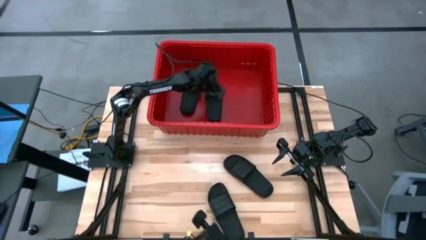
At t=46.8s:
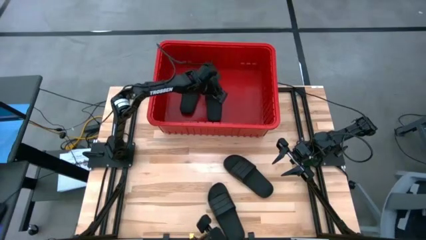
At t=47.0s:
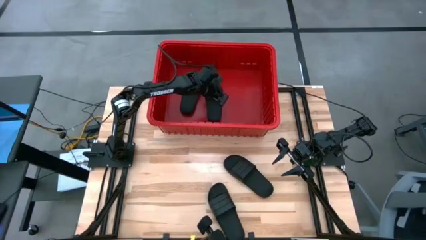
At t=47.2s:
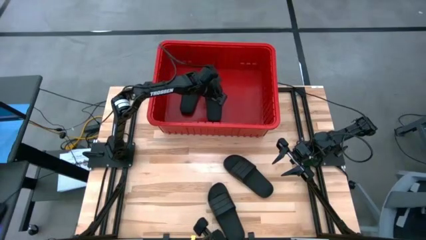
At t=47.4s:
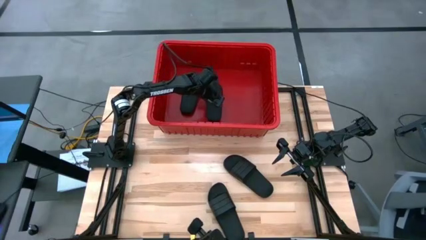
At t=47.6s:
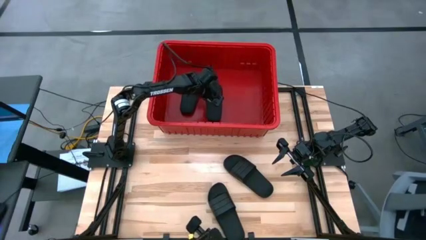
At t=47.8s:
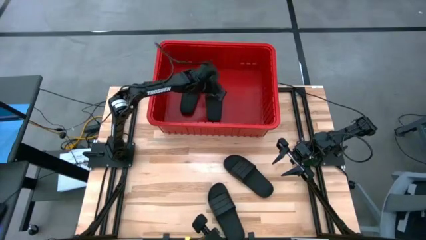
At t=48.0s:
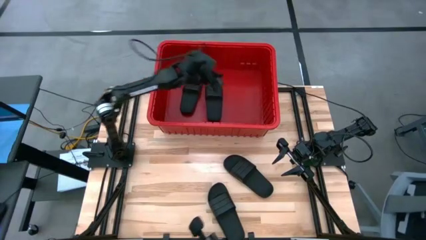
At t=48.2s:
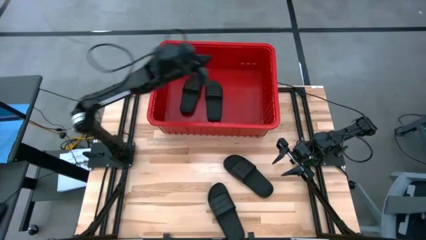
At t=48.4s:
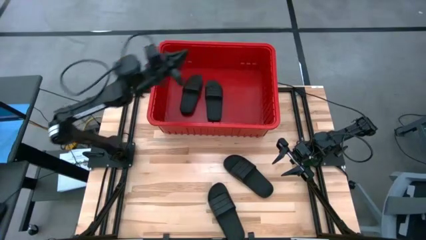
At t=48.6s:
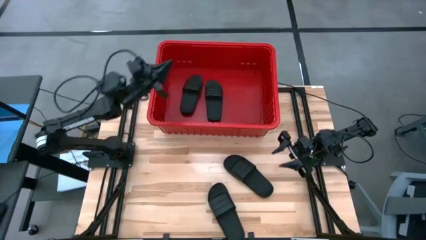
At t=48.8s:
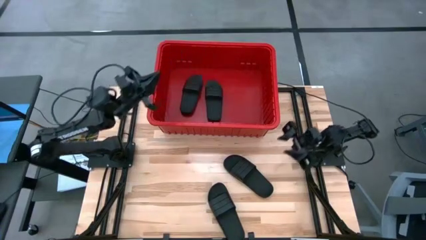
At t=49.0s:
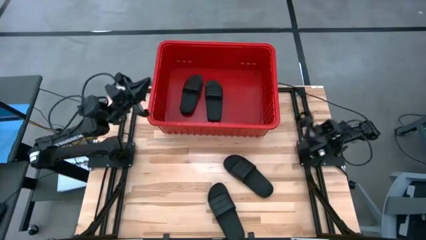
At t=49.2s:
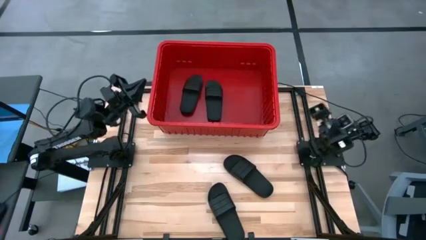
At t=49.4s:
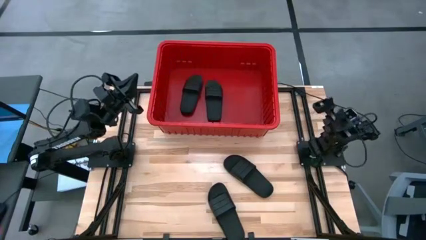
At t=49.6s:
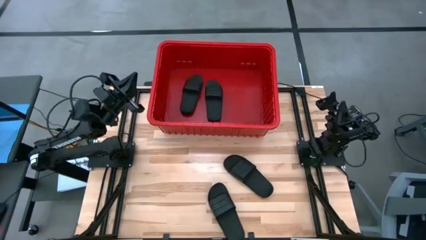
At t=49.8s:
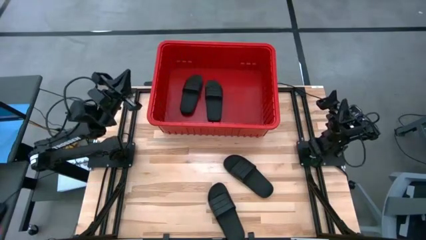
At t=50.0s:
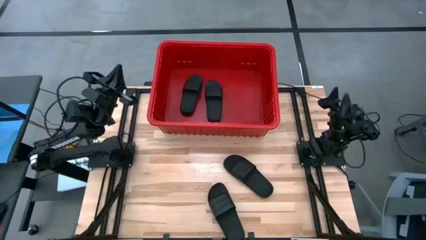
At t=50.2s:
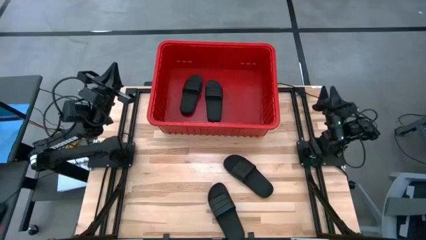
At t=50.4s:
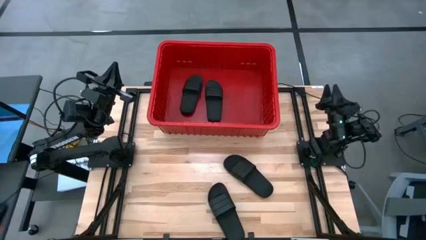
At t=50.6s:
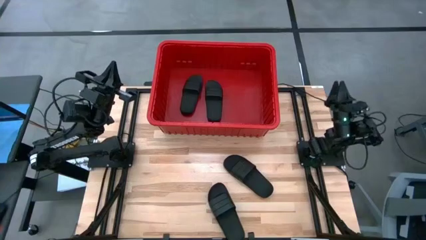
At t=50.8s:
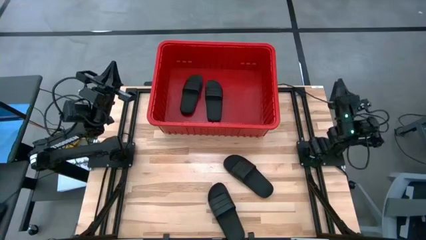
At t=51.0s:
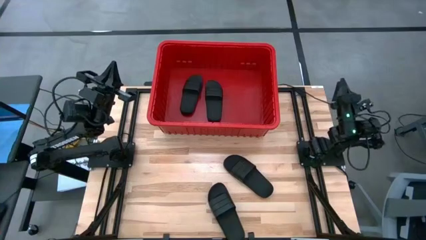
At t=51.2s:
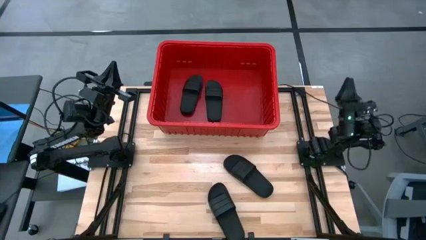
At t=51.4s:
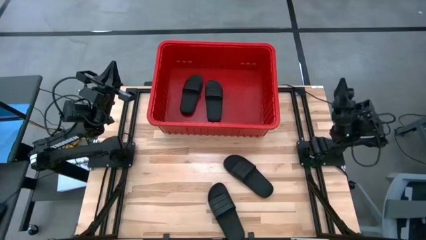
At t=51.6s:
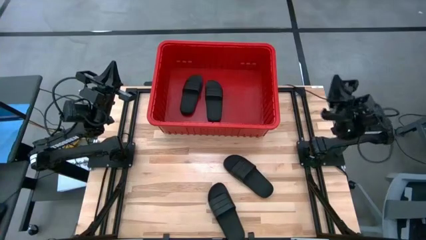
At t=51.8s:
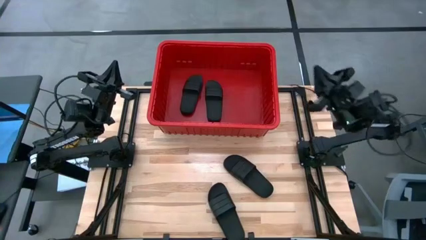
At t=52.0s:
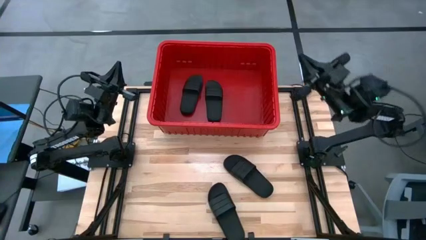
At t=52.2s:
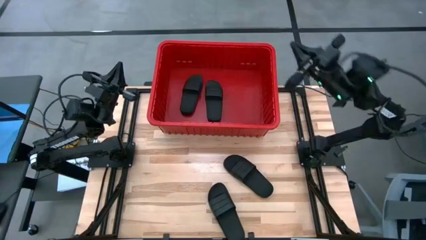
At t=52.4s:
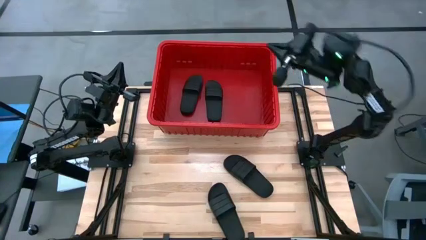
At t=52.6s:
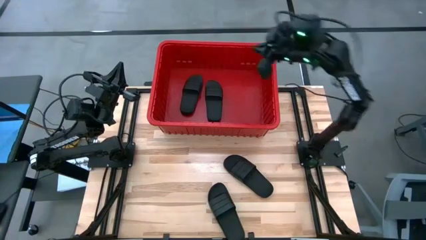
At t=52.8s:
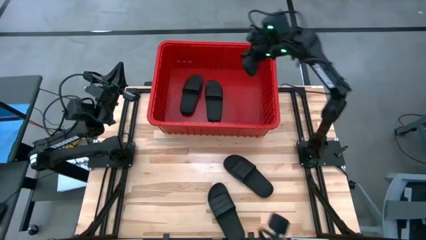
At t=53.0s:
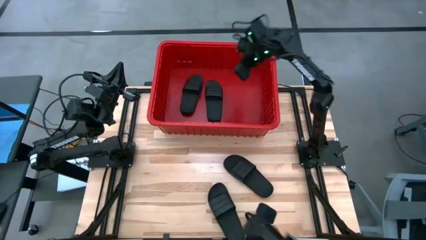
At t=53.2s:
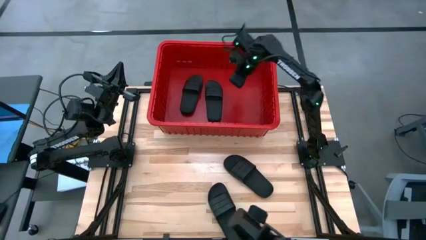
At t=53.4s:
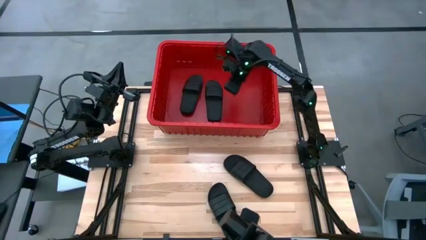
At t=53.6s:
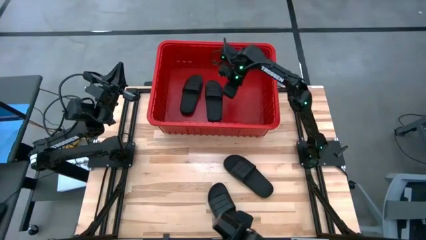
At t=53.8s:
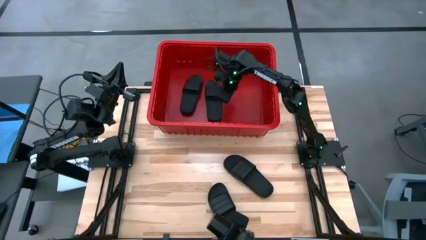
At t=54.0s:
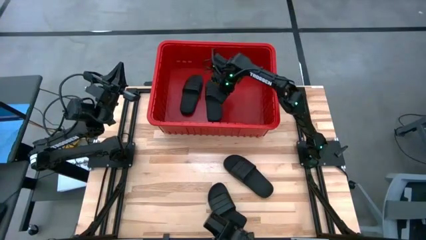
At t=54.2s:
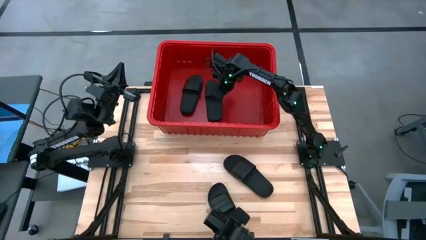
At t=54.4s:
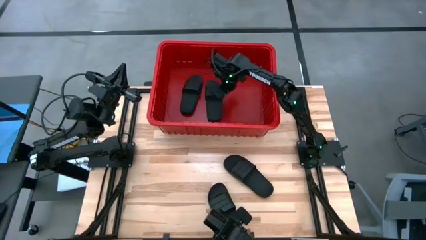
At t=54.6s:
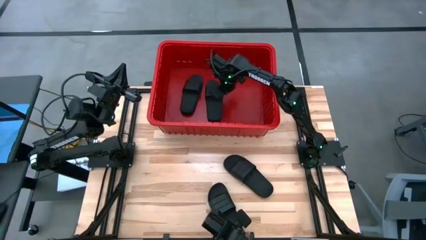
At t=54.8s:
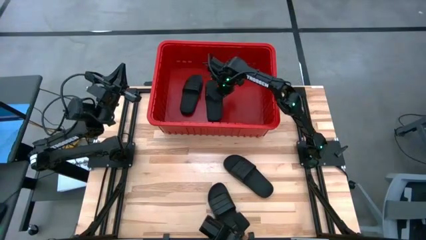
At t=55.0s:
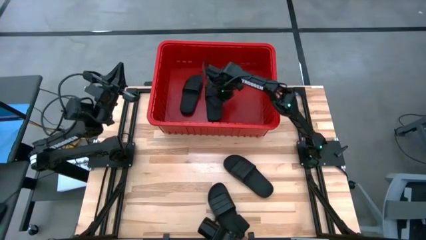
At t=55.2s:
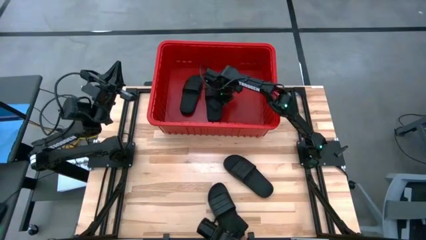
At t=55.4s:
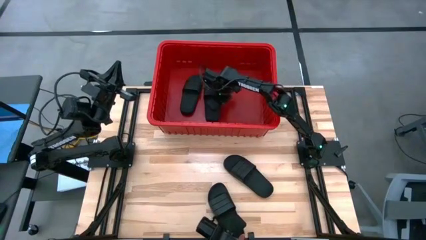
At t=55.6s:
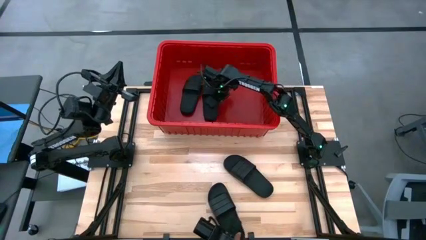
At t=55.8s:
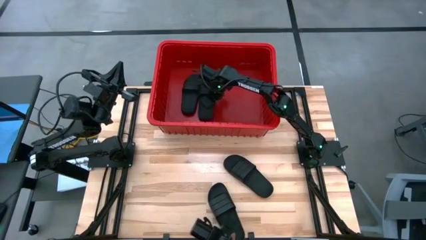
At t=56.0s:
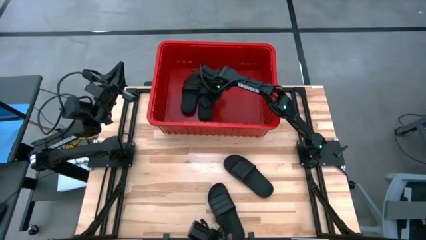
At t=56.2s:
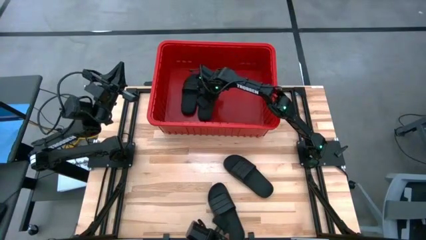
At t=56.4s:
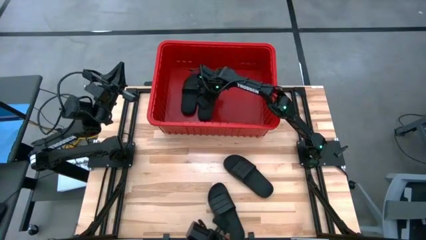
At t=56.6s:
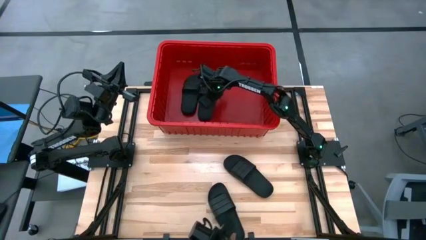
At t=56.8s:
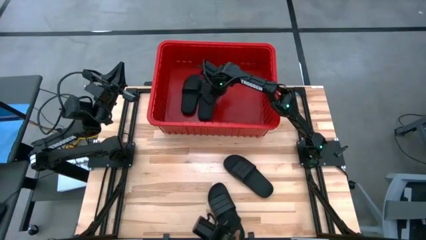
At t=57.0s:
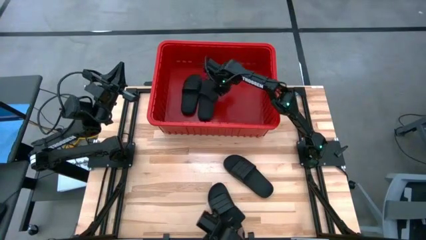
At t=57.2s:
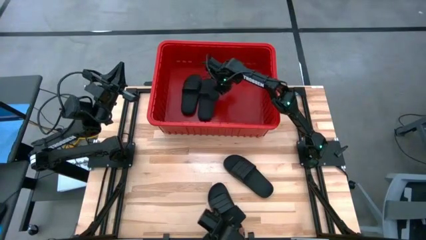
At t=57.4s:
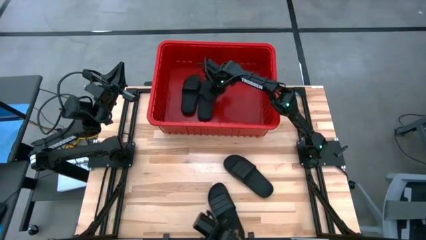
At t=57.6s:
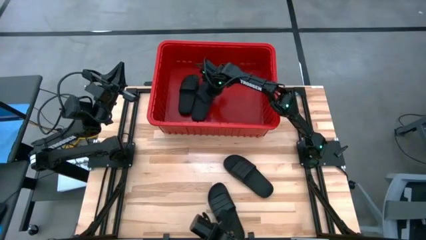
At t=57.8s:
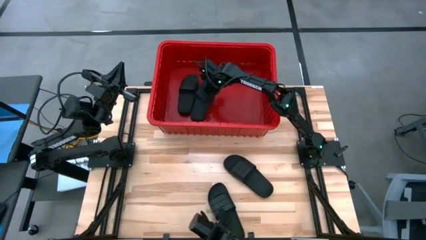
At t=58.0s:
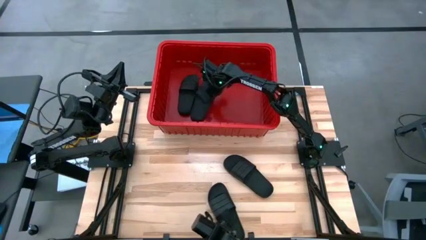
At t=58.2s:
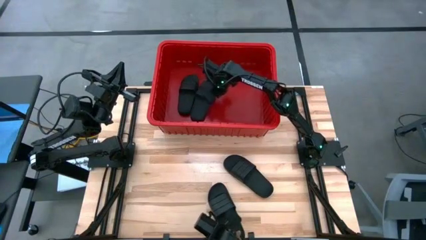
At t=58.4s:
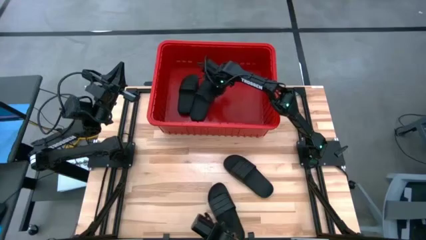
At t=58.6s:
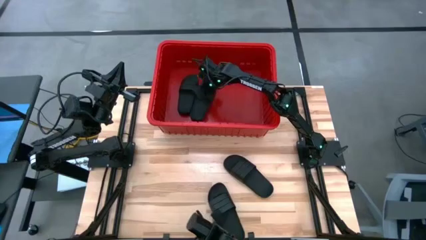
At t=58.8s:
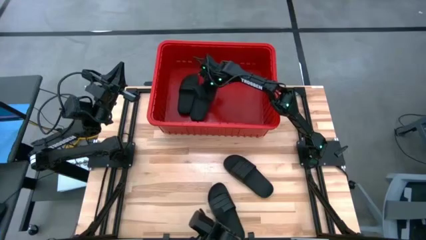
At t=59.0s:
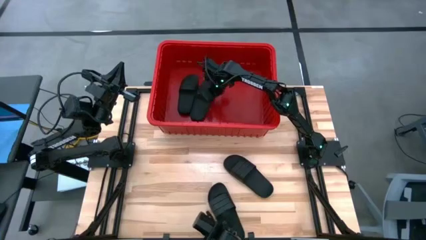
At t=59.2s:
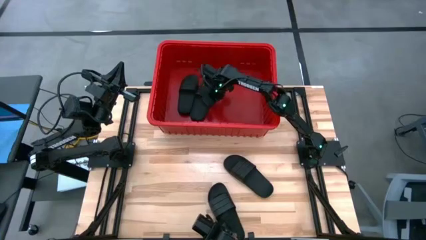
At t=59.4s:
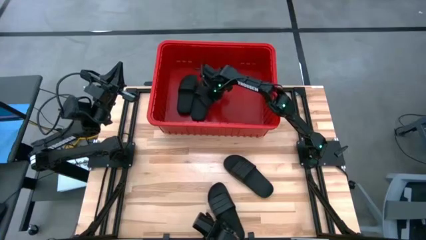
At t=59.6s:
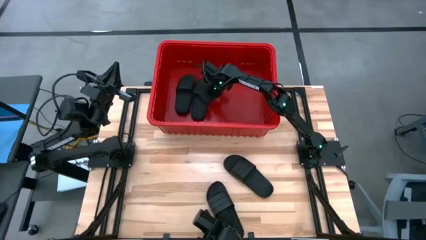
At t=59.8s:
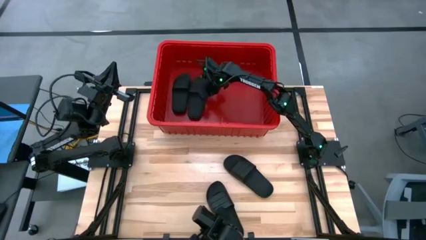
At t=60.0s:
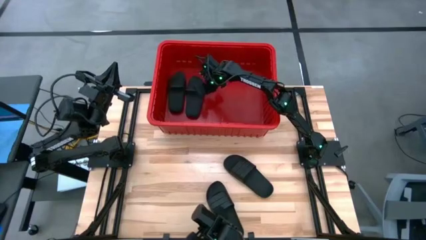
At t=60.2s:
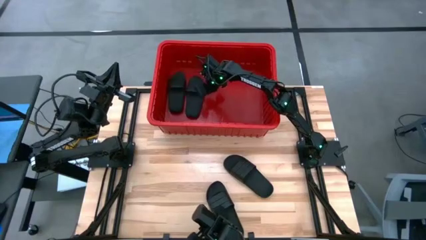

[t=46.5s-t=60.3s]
Task: Pick and place slides into bin
Adjust the slippers in the organizer bin

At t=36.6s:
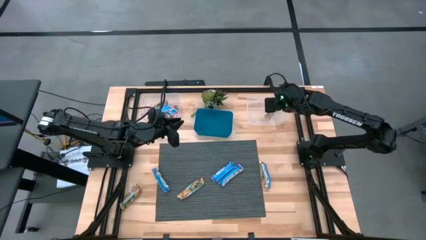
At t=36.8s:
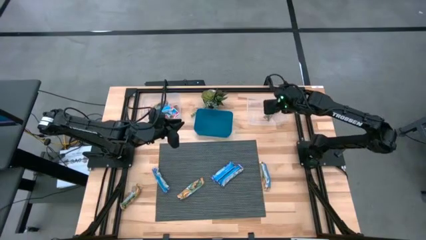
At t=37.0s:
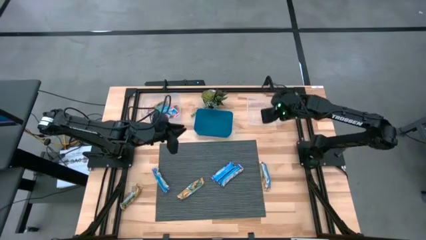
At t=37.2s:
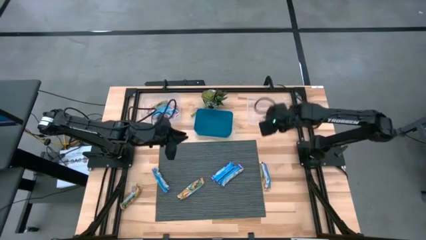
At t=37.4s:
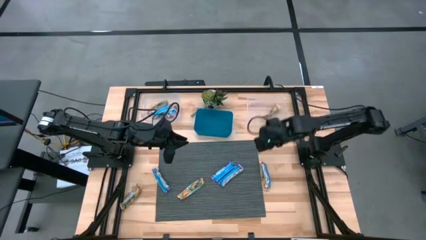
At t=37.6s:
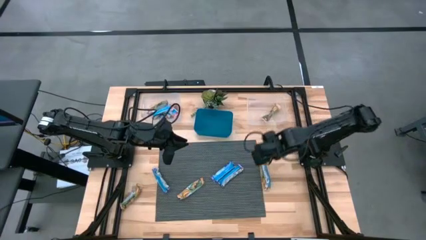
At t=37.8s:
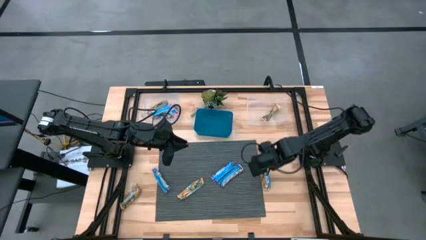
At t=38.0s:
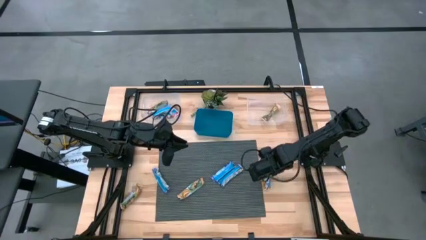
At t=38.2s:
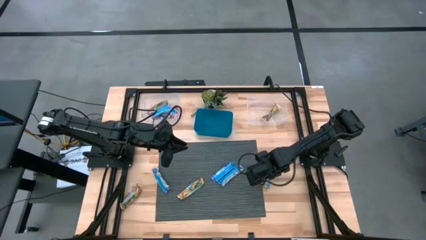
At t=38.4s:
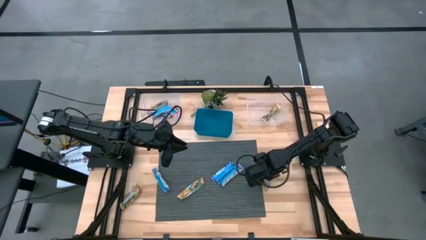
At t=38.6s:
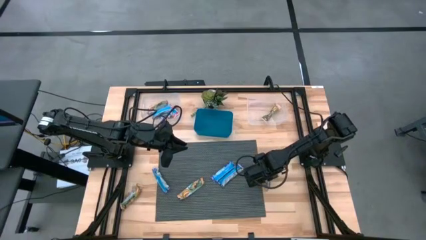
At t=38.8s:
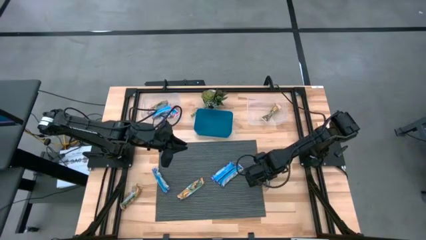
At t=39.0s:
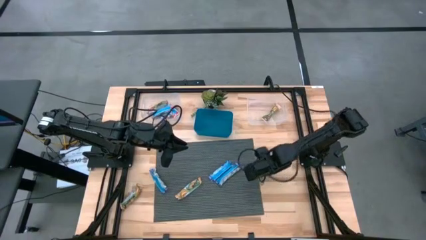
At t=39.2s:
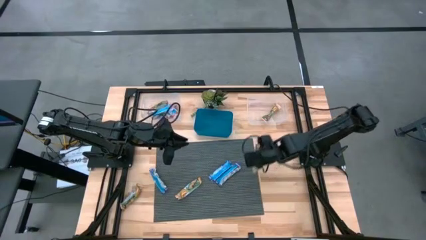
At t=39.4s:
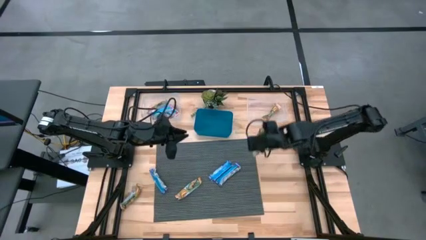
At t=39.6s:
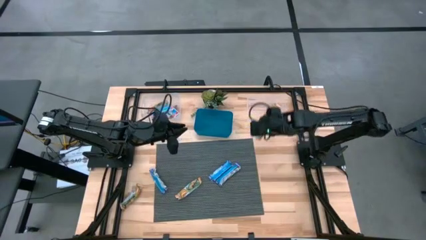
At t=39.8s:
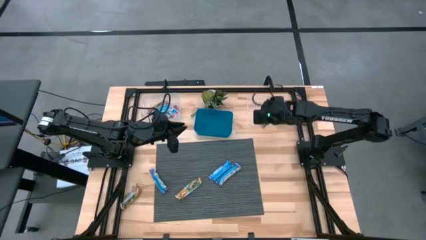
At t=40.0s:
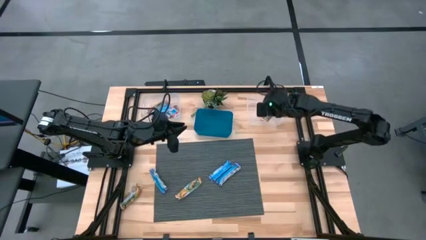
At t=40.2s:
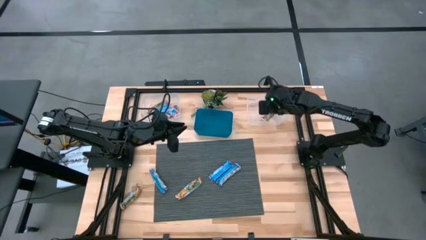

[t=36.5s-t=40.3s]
Task: Pick and place Granola Bars by type
Put the yellow granola bar into the right transparent bin
